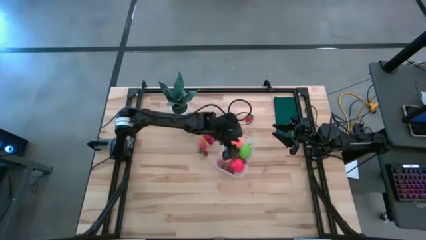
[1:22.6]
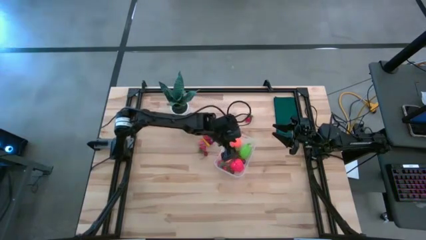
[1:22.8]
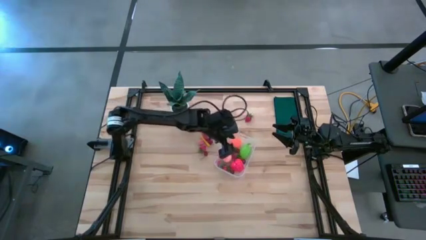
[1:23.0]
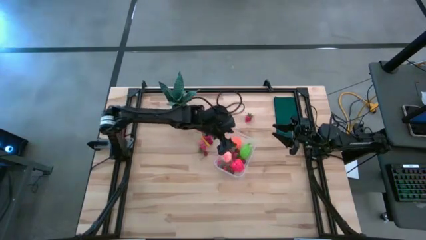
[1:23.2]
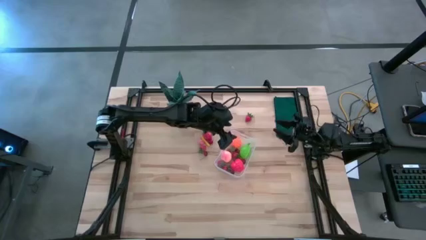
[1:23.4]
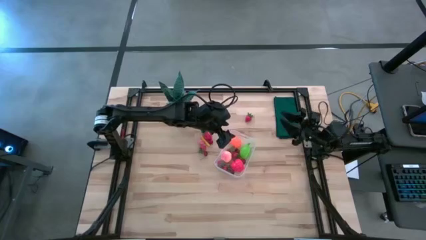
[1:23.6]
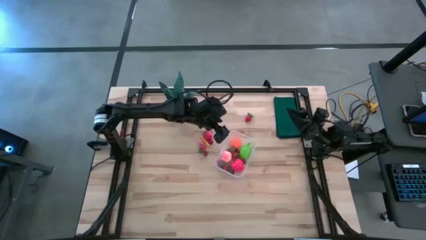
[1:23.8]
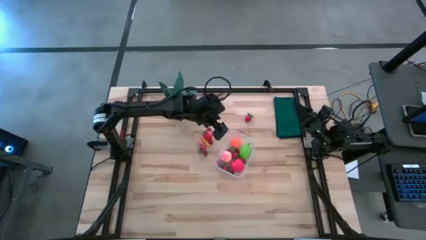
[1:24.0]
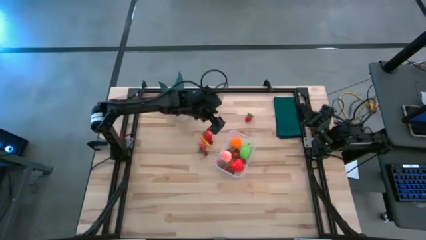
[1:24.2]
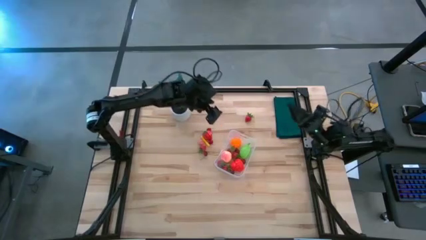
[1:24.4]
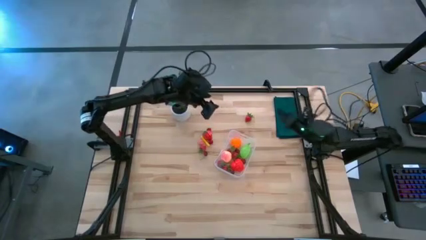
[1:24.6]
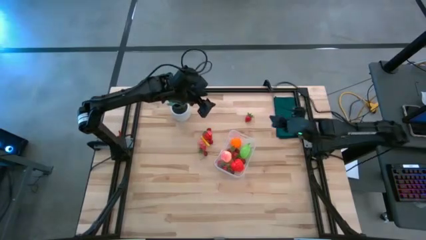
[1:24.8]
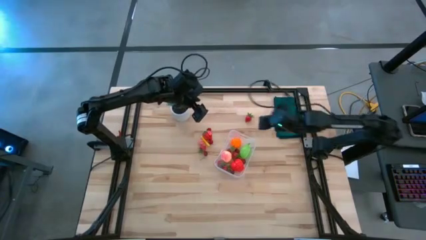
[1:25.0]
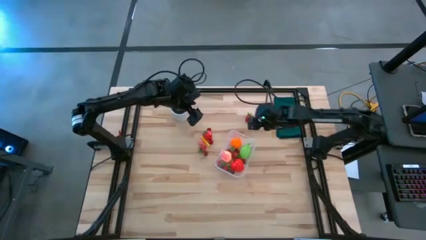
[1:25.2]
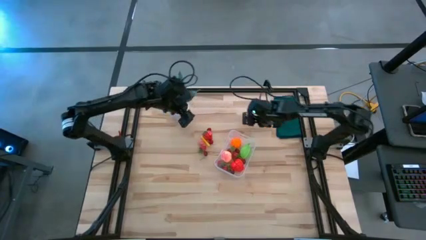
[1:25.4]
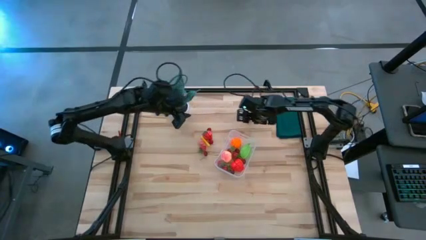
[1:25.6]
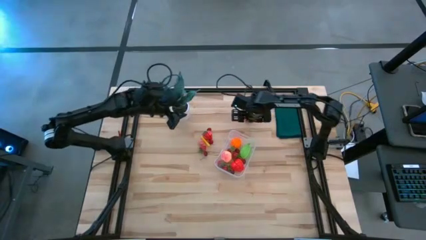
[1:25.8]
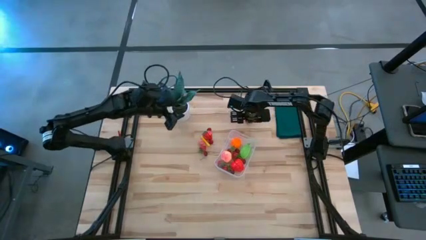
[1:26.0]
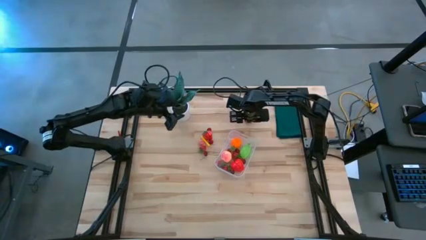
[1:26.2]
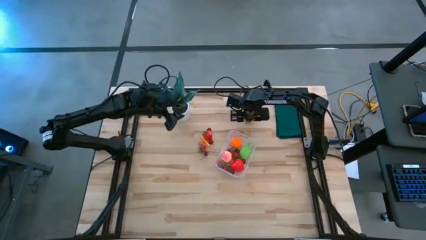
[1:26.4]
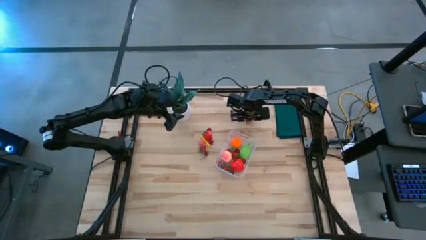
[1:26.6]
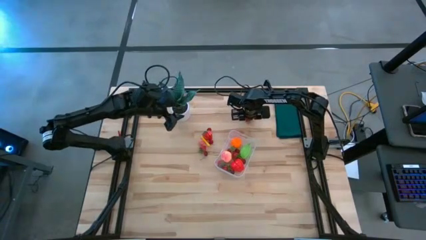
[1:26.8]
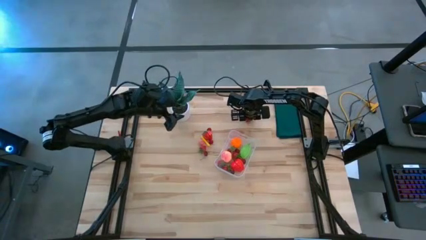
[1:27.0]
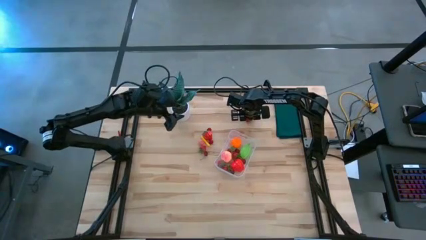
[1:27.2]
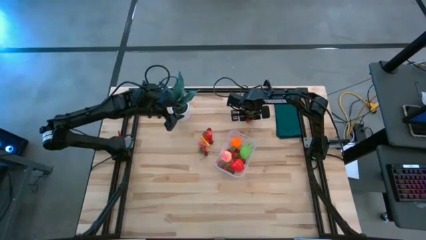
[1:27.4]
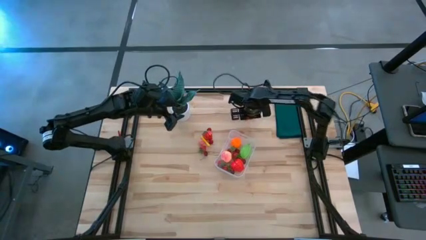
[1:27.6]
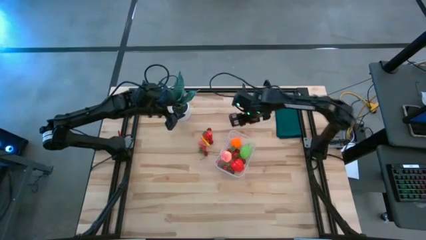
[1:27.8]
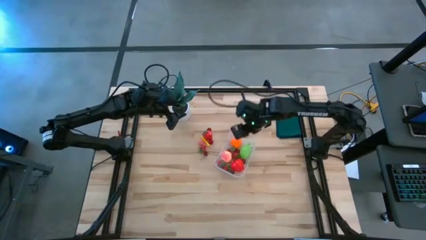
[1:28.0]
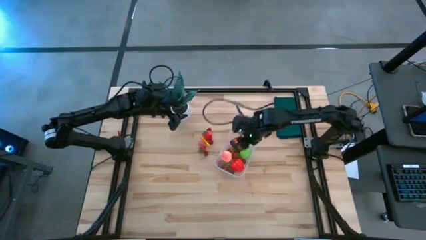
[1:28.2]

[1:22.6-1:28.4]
Task: Pick and placing Produce into tupperware
Put the red strawberry into the container

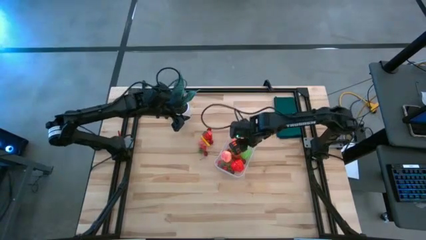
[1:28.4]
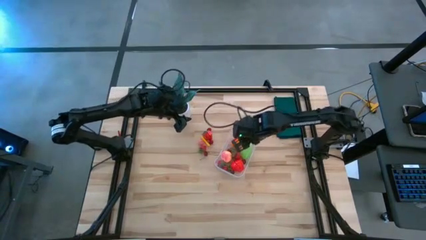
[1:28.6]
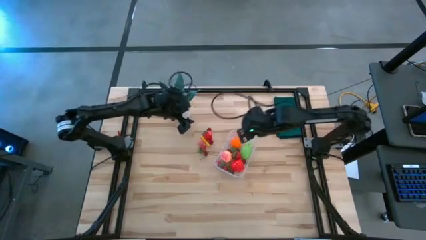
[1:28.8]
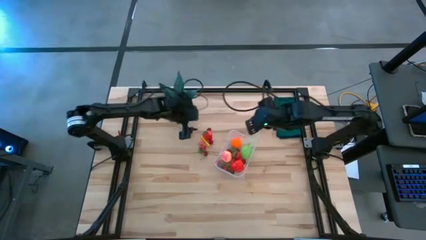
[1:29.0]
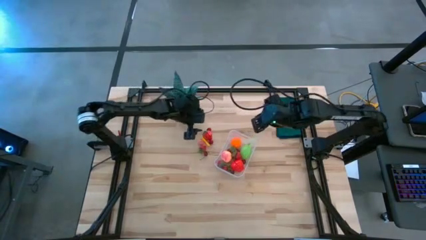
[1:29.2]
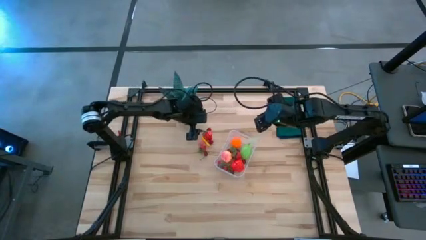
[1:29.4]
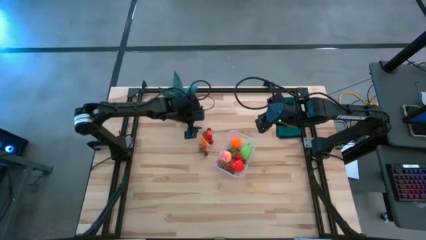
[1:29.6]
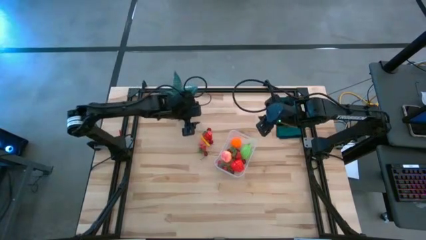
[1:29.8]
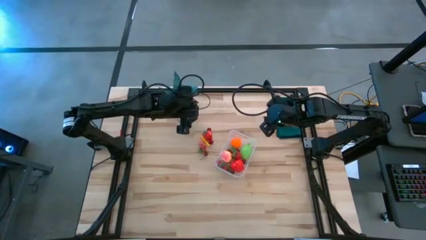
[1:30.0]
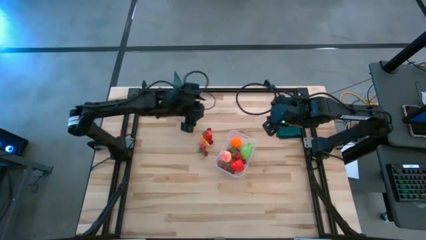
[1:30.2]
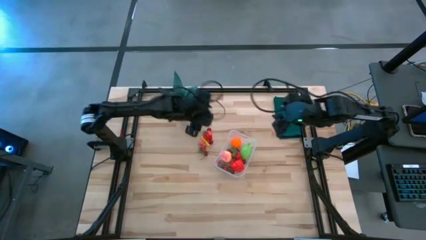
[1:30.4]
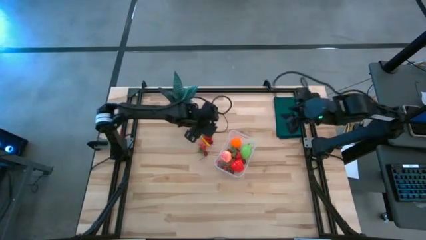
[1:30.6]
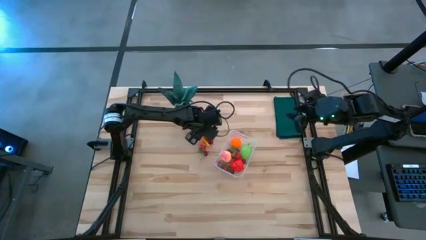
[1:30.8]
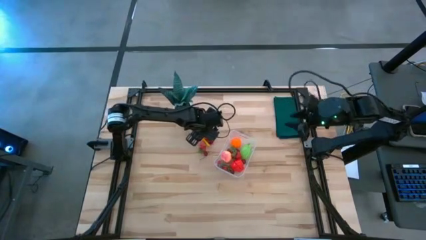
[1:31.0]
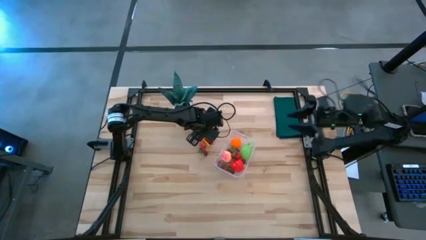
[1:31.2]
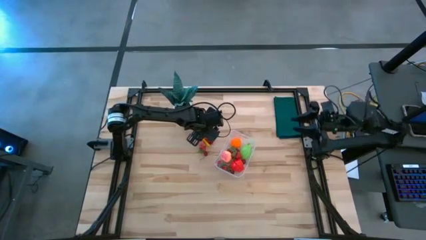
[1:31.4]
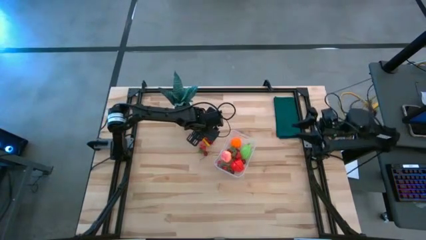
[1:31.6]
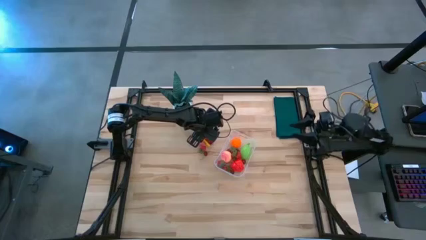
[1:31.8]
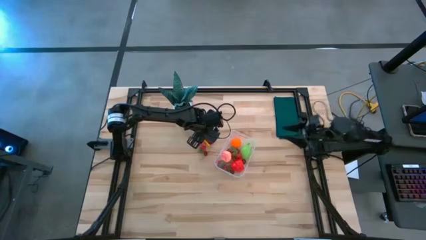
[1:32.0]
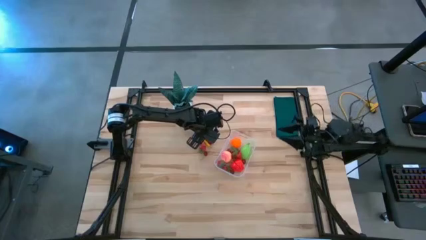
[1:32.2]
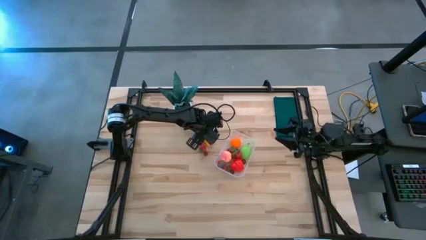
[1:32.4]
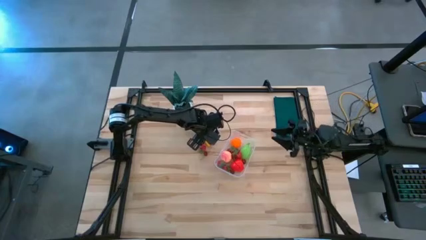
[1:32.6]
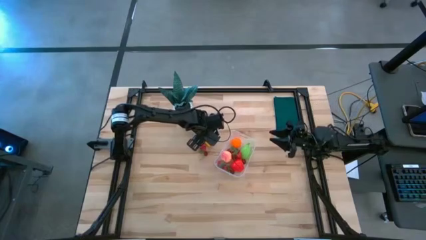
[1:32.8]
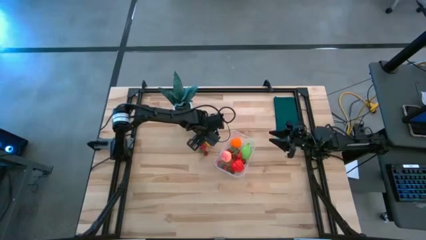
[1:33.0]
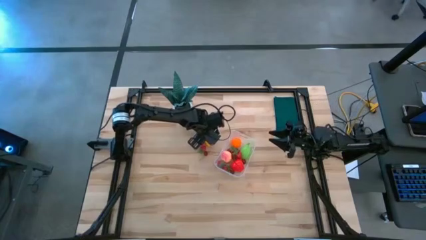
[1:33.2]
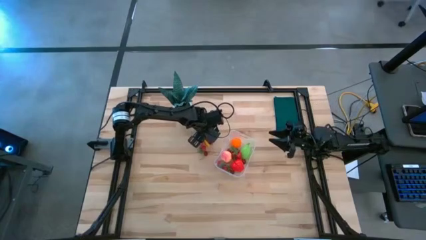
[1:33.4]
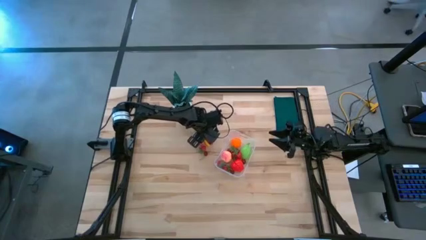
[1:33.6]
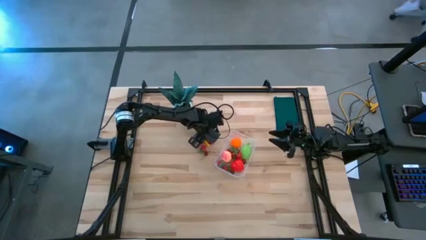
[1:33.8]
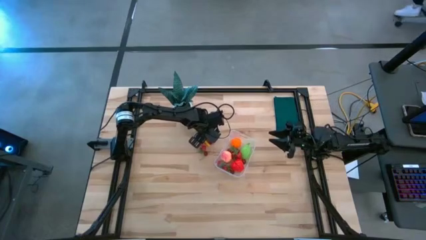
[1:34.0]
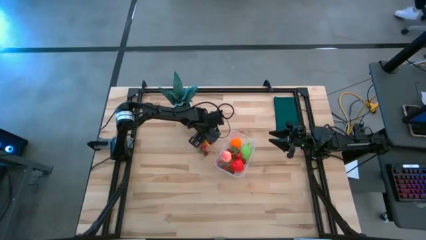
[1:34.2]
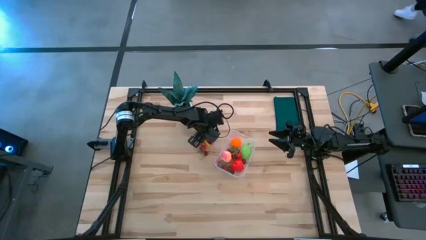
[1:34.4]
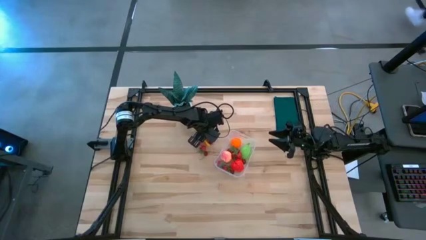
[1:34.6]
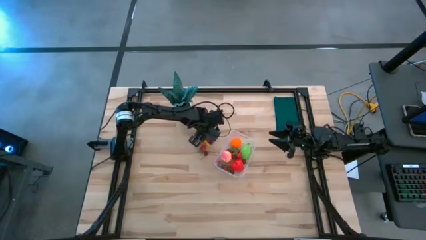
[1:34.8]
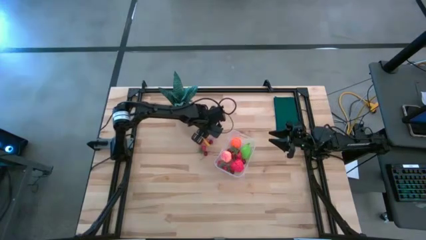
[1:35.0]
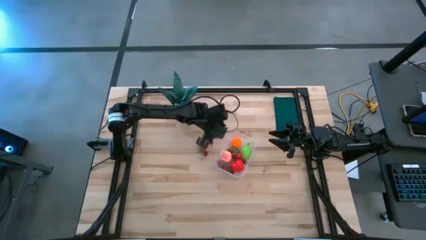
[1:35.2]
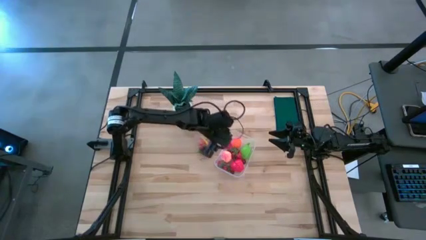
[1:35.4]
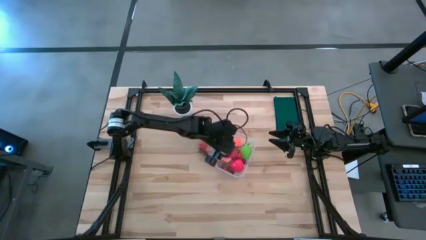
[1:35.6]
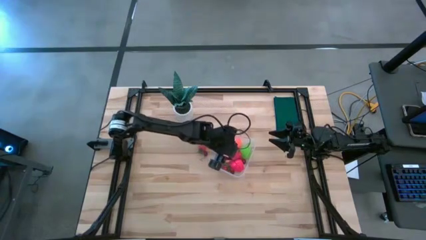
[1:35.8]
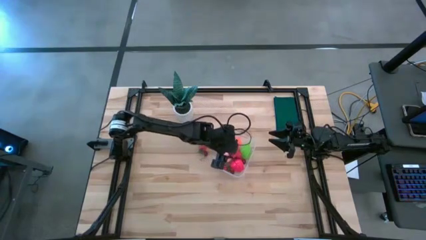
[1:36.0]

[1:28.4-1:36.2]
Put the red strawberry into the container

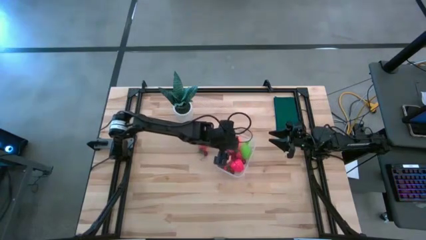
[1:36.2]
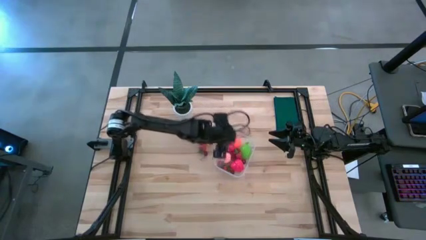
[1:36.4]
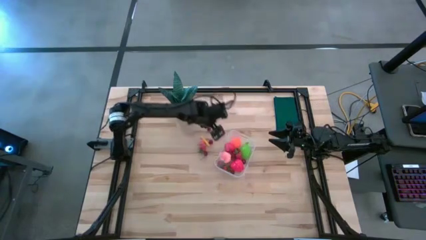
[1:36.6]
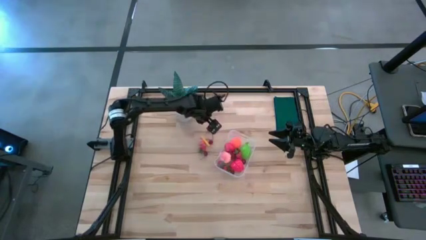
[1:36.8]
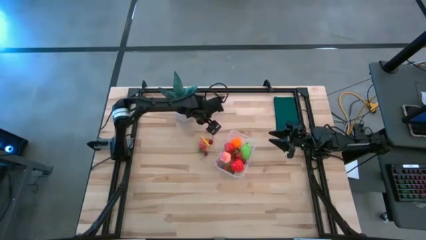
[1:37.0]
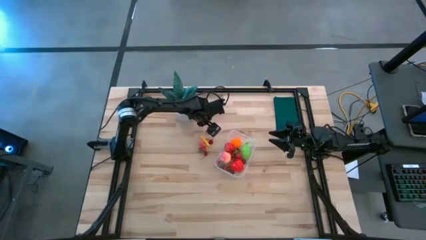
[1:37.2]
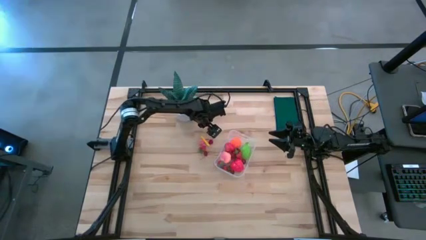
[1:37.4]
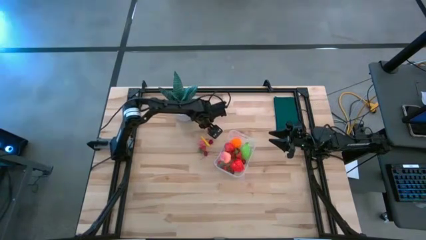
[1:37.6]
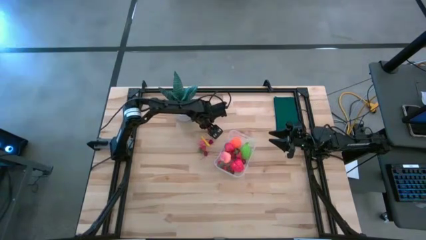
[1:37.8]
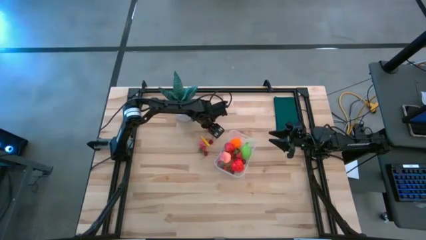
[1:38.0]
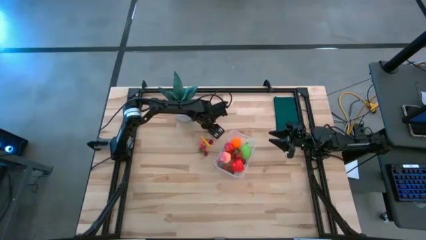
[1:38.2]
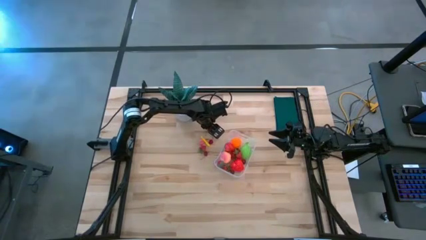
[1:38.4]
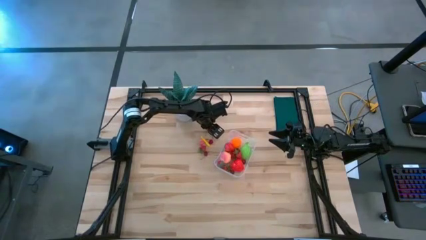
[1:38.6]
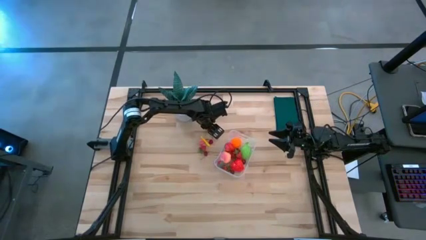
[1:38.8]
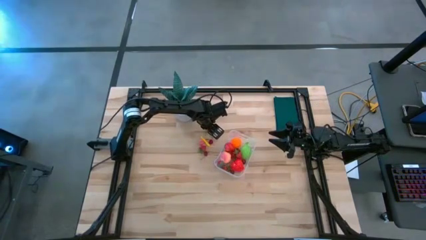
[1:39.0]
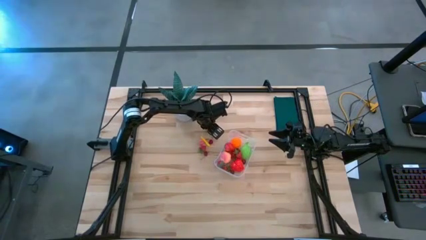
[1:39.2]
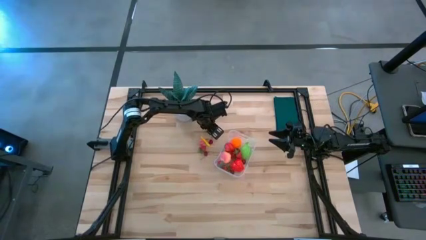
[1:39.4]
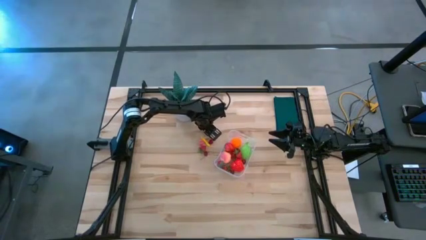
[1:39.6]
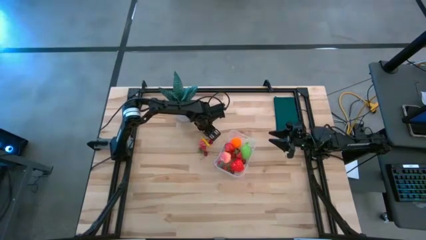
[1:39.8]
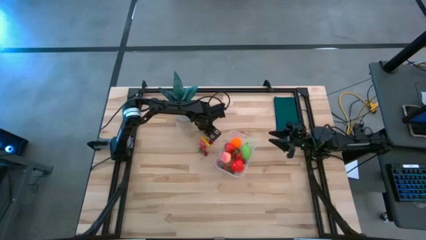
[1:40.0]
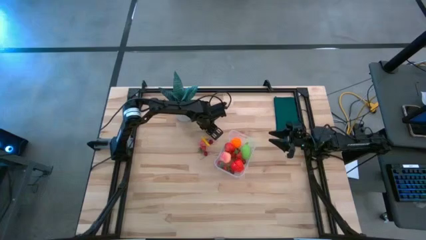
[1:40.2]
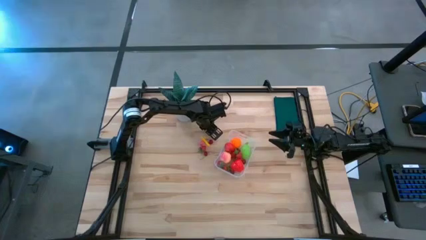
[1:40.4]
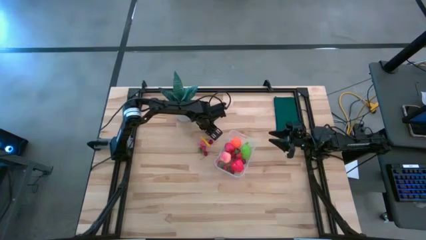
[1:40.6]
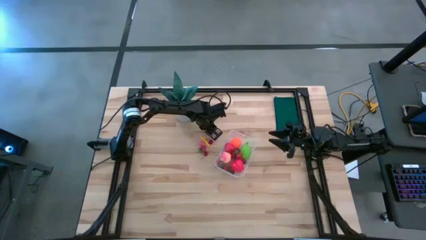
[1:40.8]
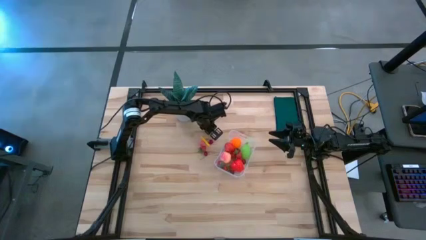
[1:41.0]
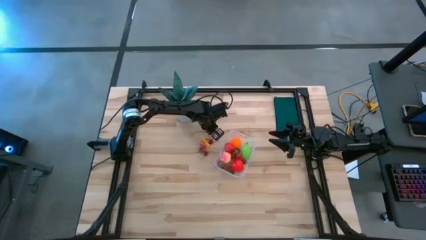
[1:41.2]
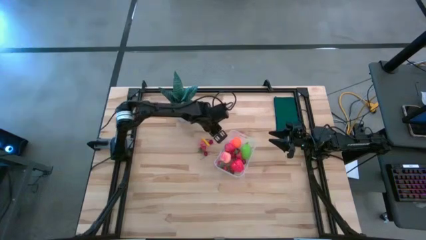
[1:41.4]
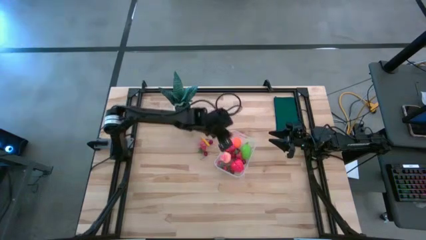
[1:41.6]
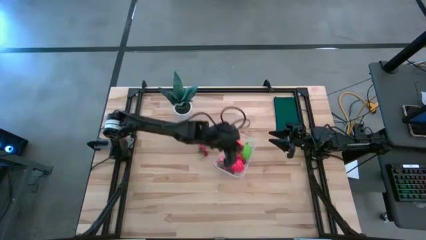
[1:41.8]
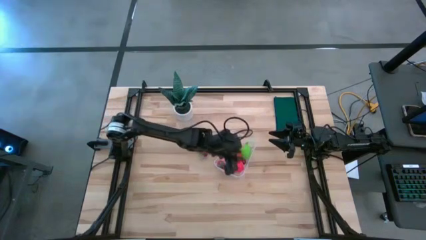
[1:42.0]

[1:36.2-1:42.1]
Put the red cherry into the container
